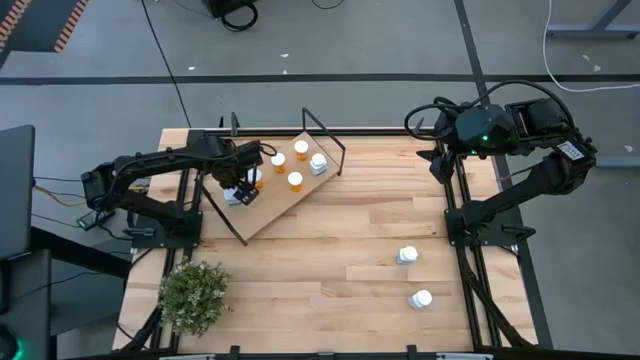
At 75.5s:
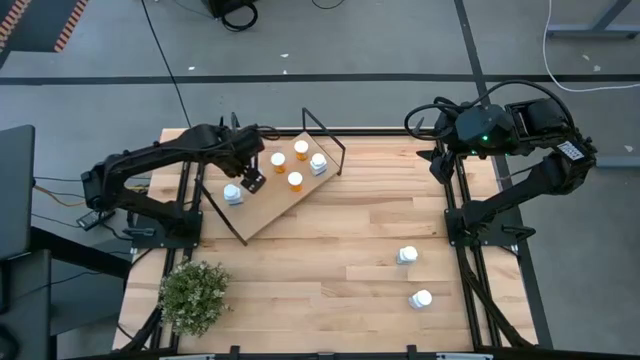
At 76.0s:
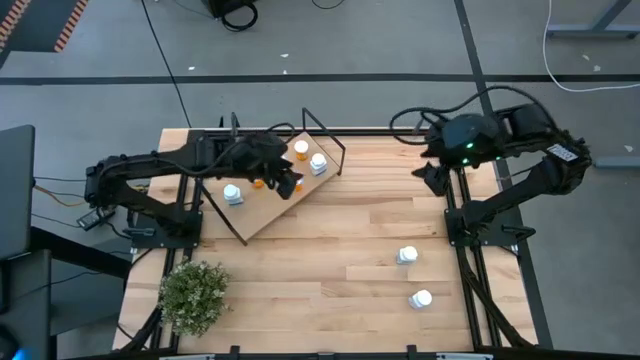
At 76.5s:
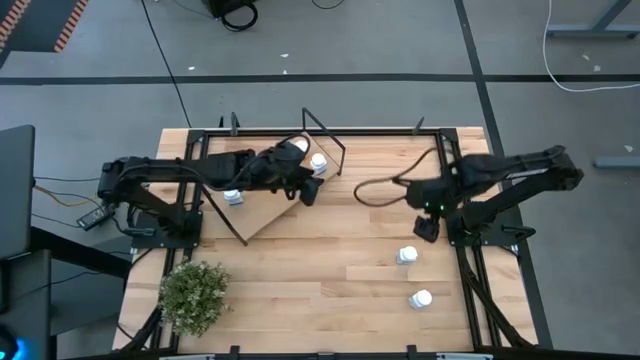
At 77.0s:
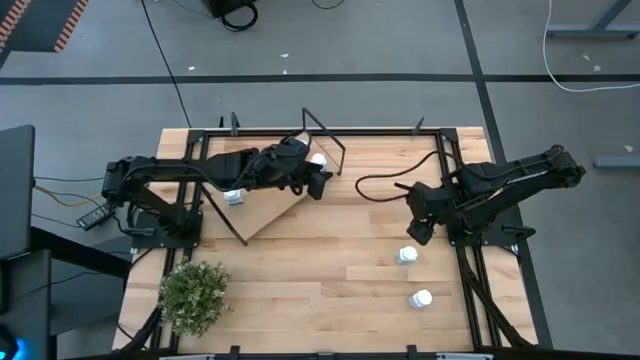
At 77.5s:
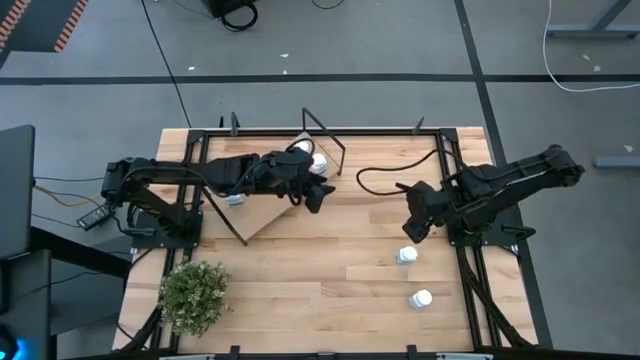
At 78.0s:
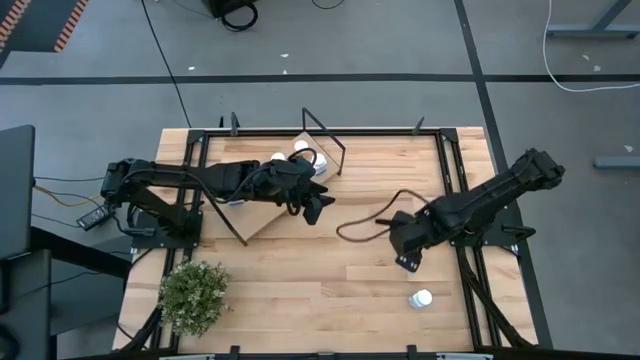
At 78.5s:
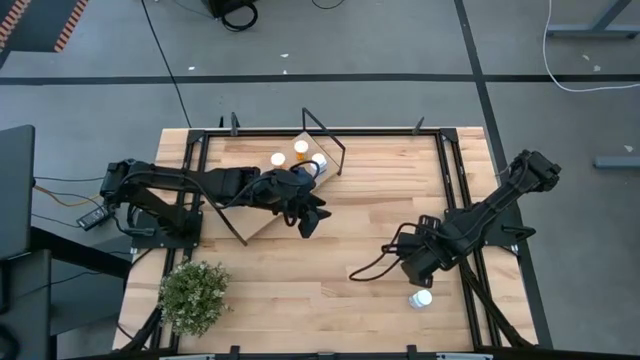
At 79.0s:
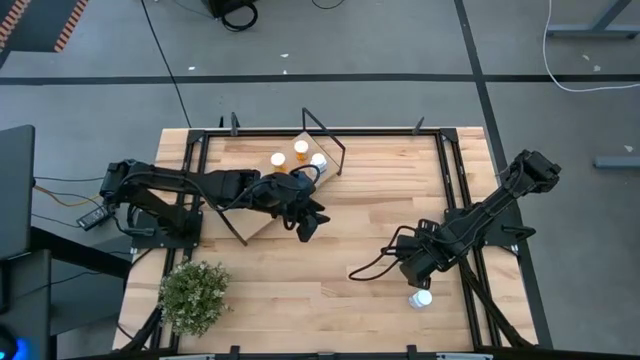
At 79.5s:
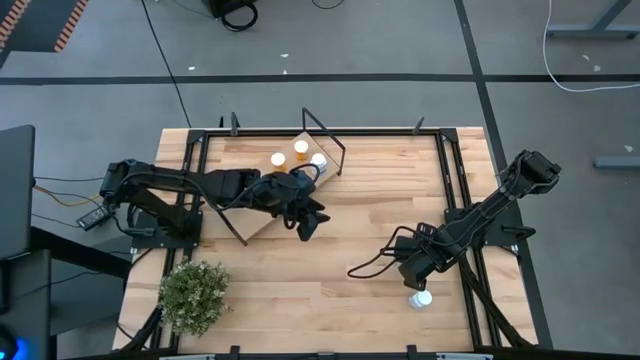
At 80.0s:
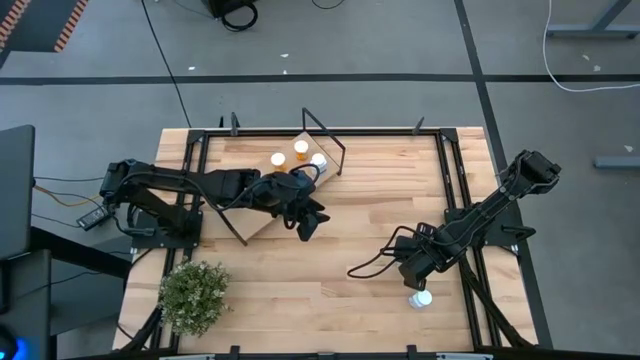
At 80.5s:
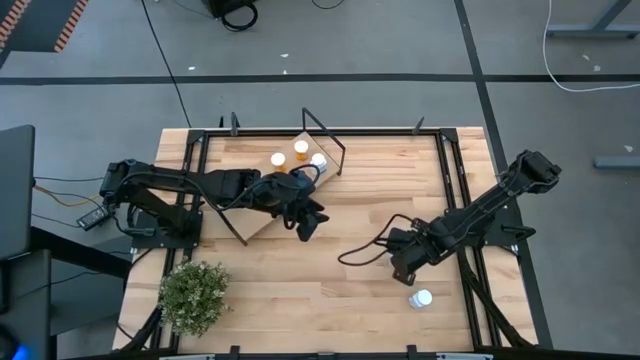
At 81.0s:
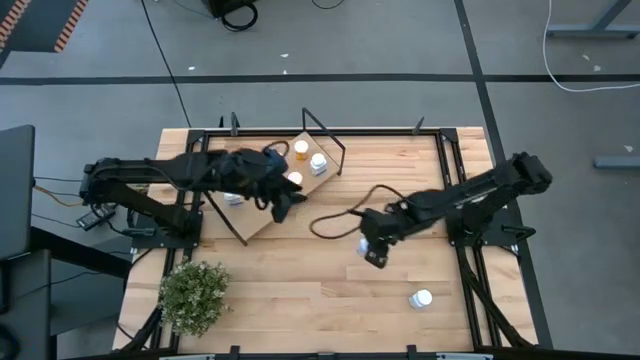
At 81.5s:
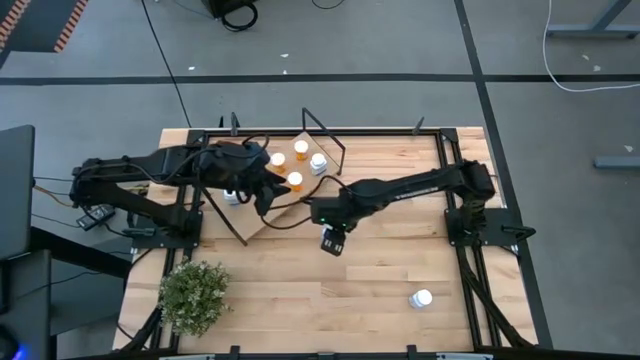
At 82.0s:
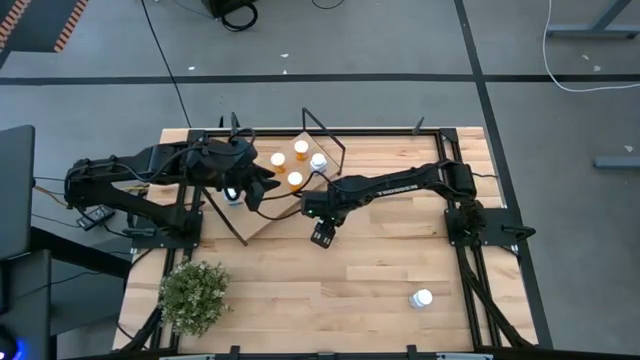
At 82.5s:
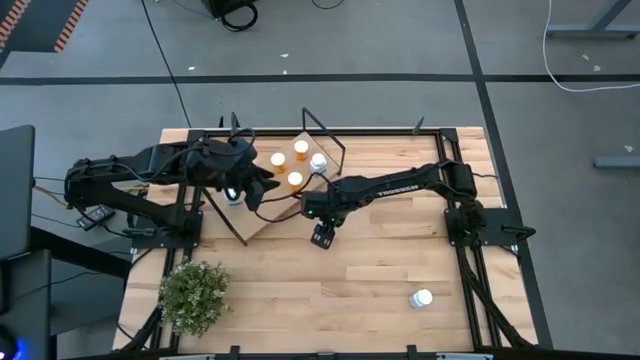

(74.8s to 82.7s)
Task: Pick and place medicine bottles onto shelf by color
Move the white pill bottle to the center of the table

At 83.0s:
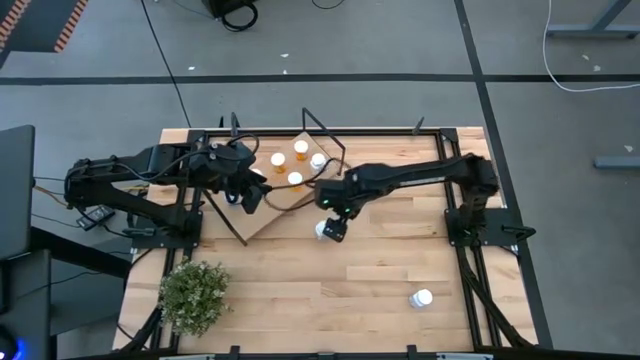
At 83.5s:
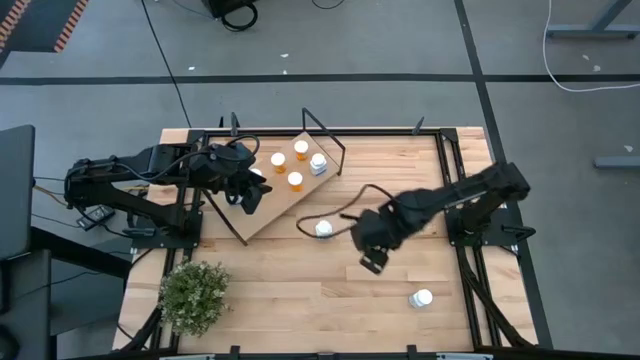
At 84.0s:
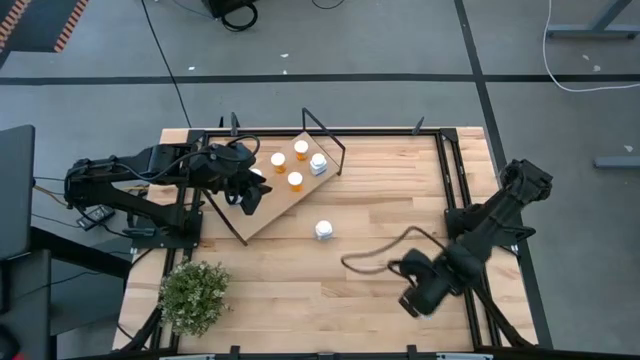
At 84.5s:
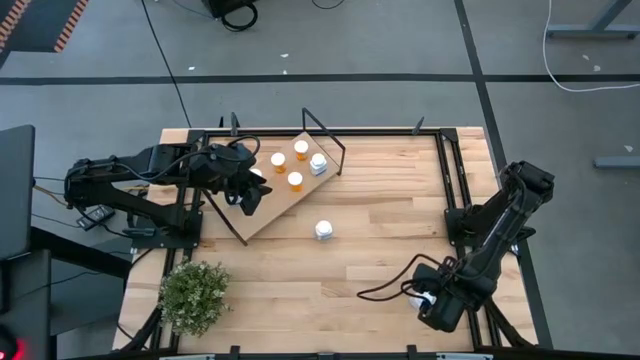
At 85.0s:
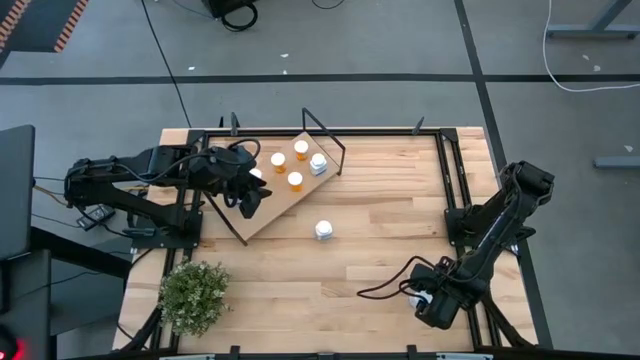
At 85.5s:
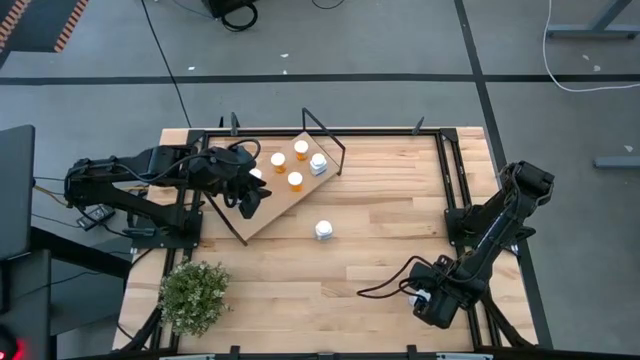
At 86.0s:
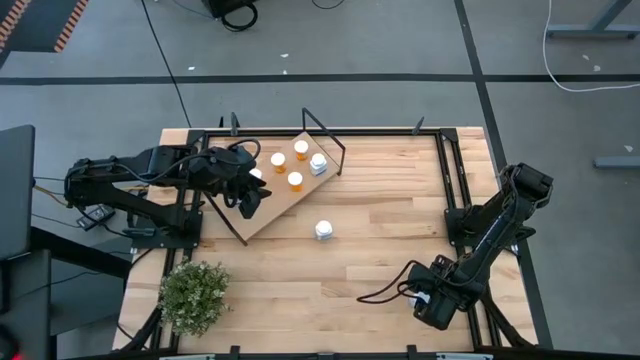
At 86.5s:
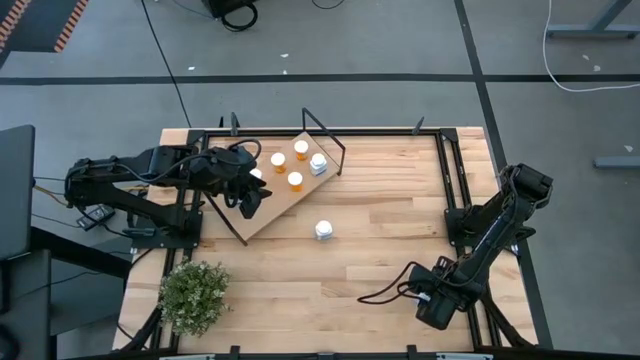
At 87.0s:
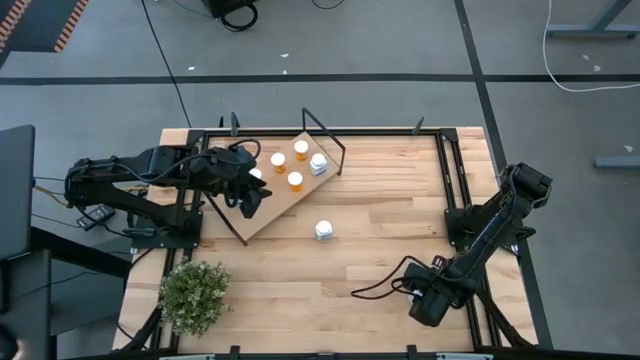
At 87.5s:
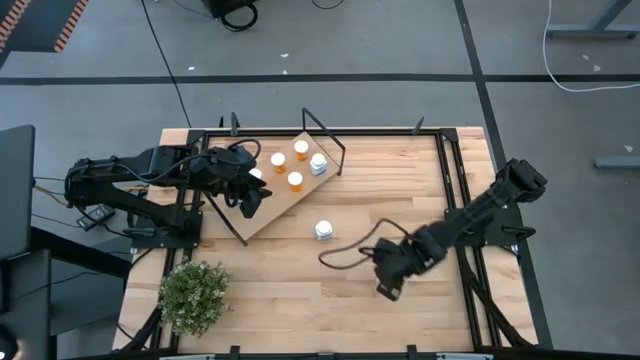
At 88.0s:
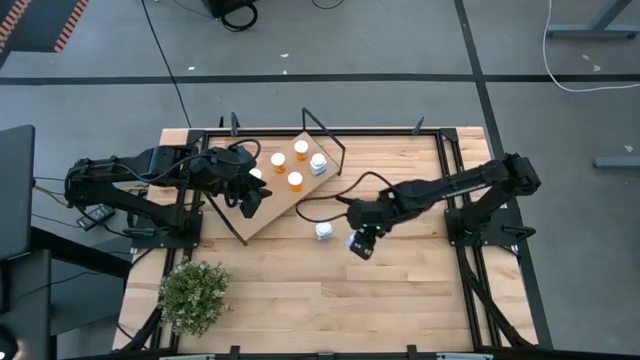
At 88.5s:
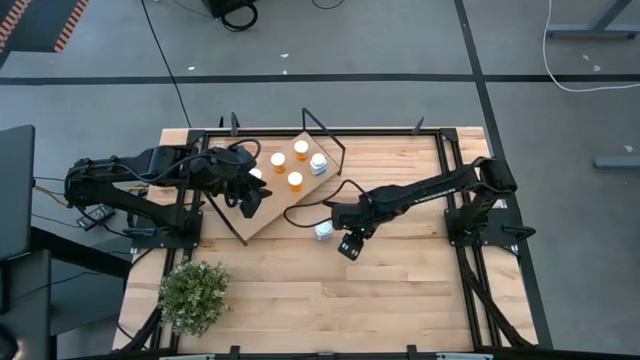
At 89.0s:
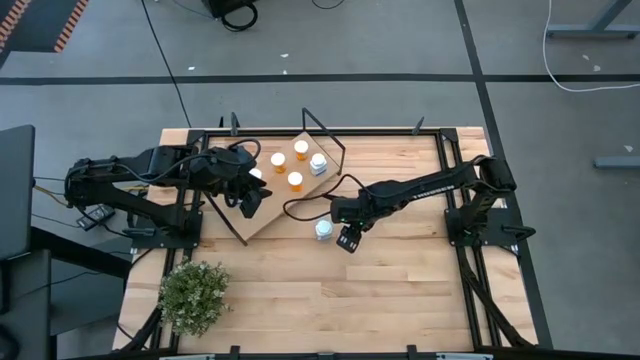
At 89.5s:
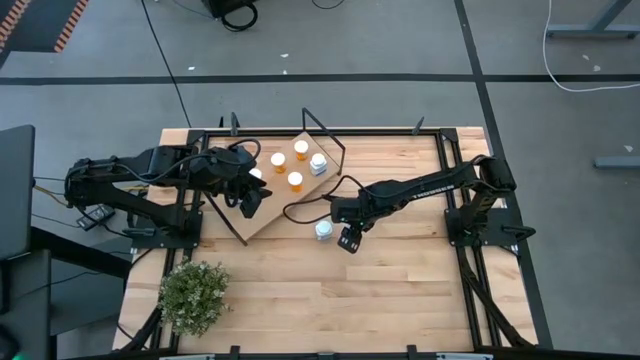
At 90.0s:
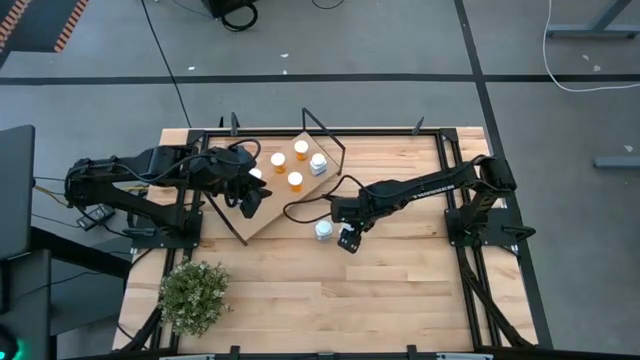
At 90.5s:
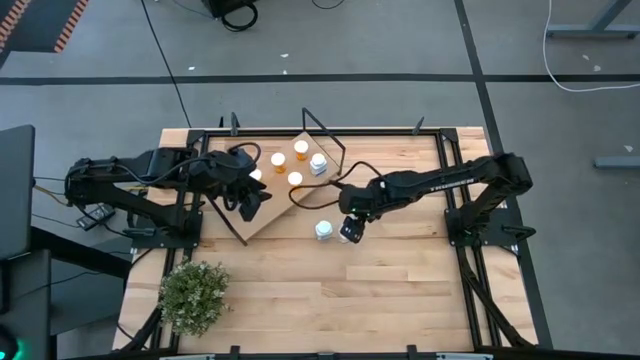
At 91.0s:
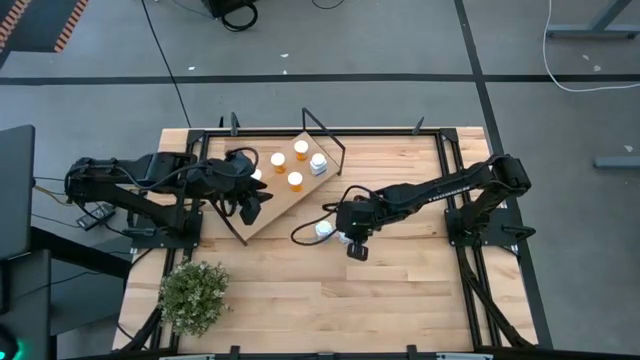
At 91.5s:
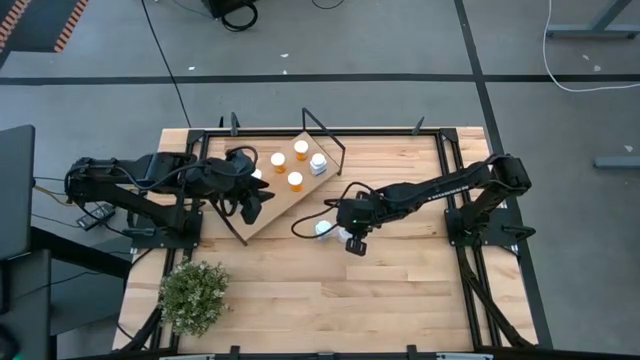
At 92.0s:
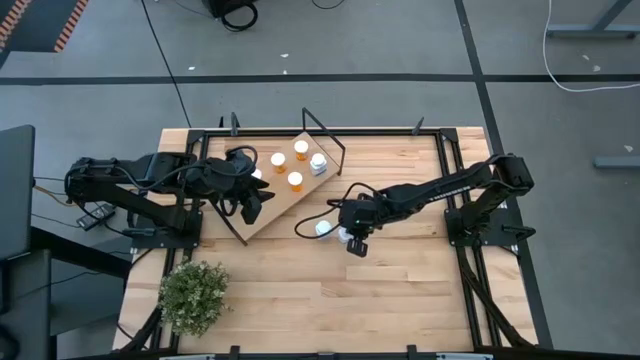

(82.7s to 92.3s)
Move the white pill bottle to the center of the table

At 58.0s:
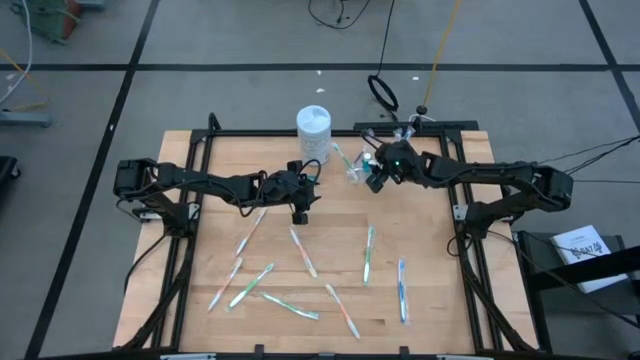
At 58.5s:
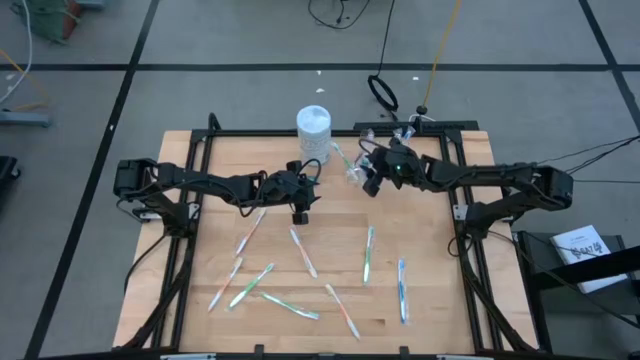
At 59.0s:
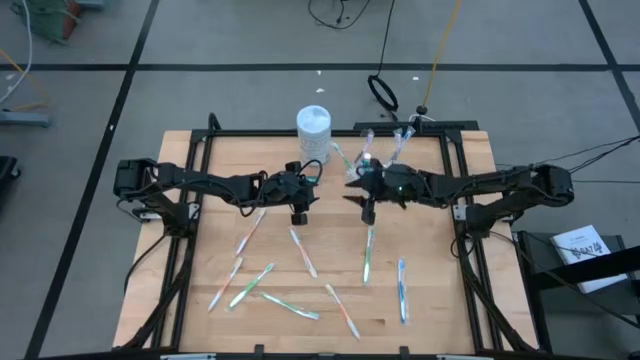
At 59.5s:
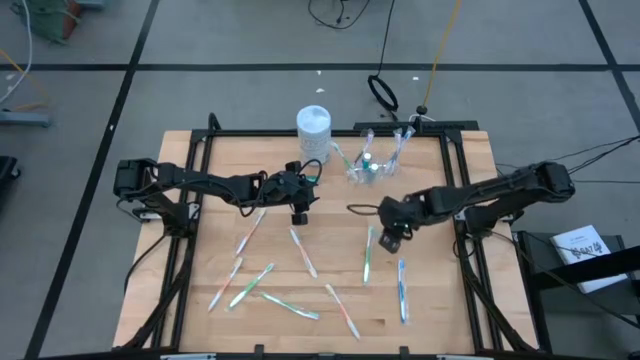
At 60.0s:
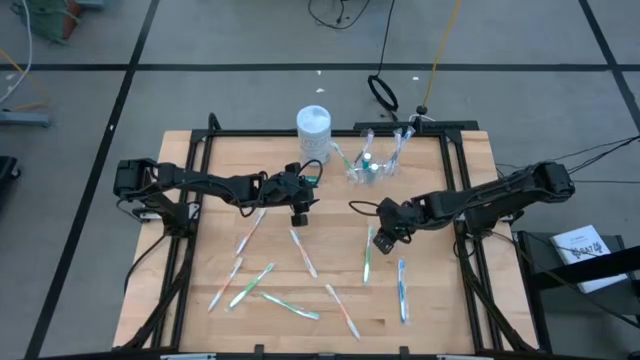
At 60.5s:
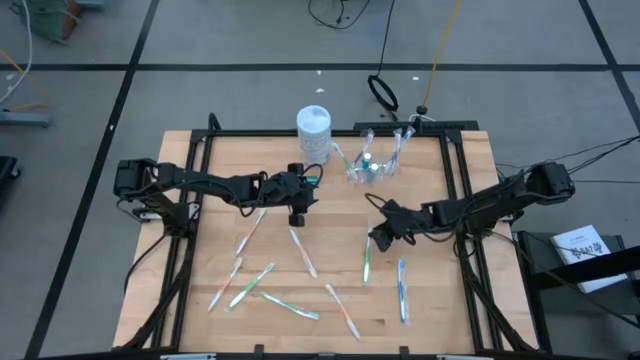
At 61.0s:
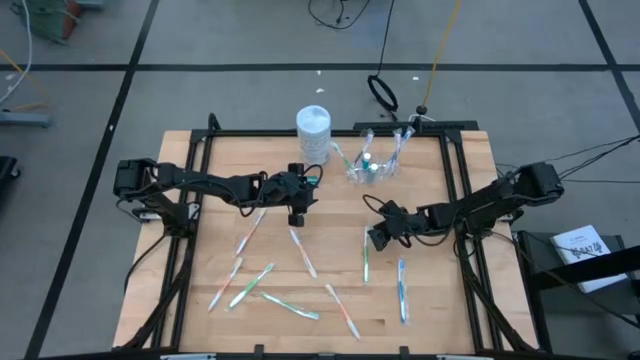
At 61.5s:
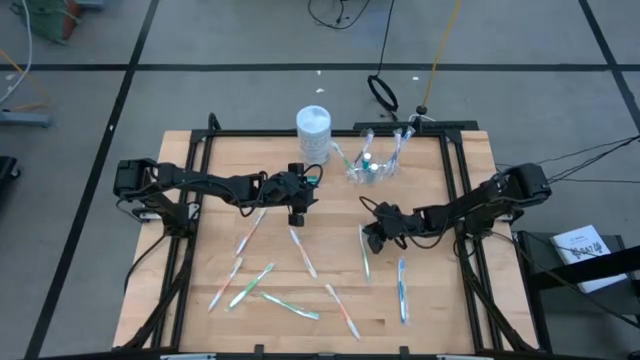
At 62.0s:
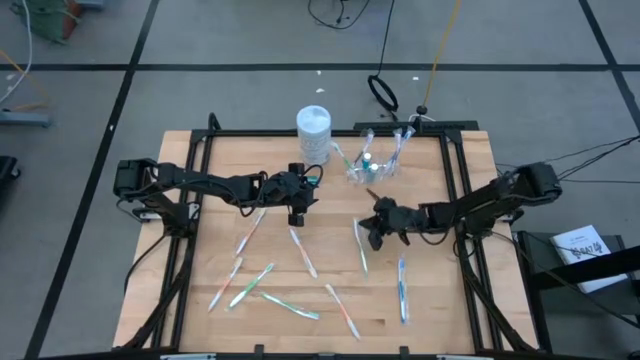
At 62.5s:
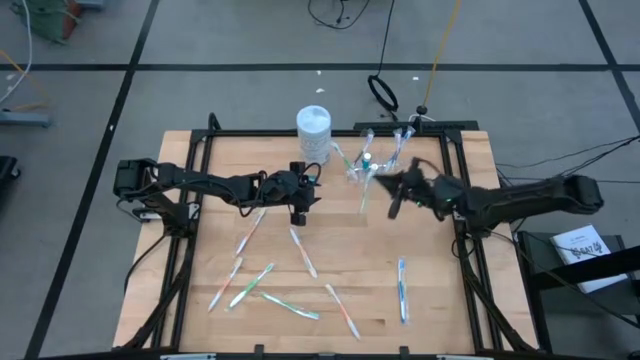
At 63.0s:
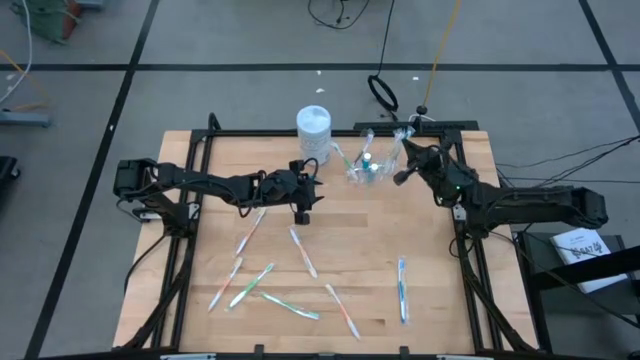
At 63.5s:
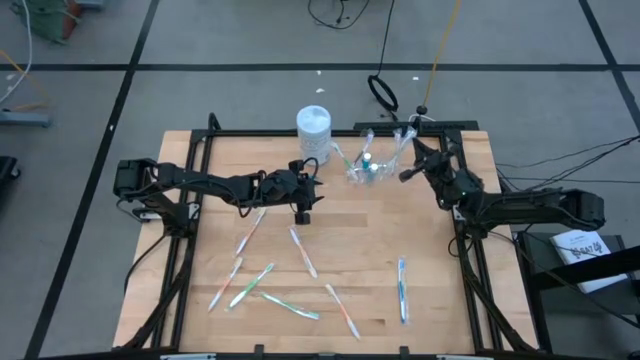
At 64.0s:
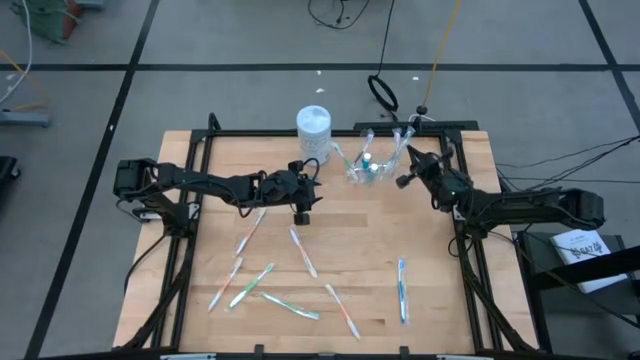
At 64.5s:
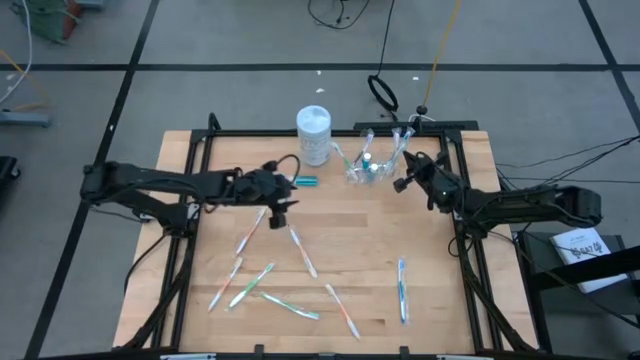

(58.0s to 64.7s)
Task: Pick & Place toothbrushing station
Put the green toothbrush into the transparent organizer
